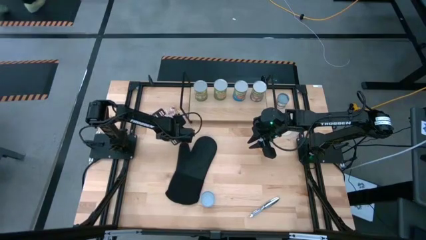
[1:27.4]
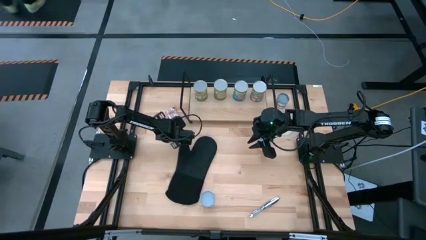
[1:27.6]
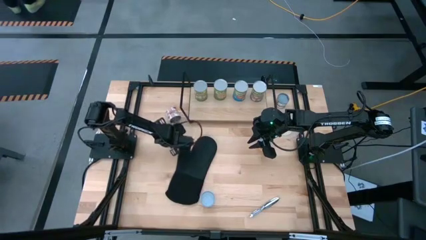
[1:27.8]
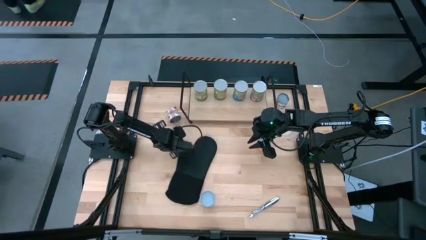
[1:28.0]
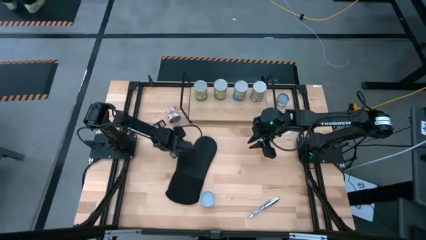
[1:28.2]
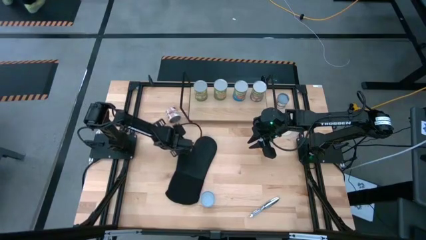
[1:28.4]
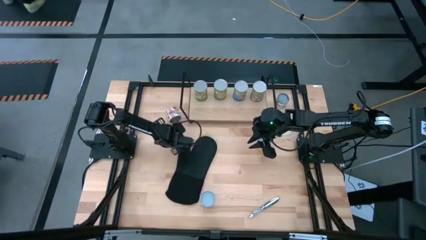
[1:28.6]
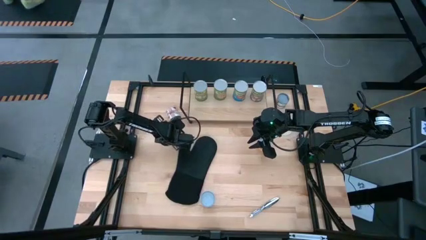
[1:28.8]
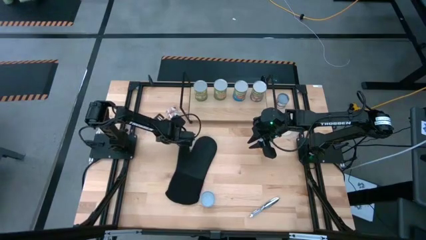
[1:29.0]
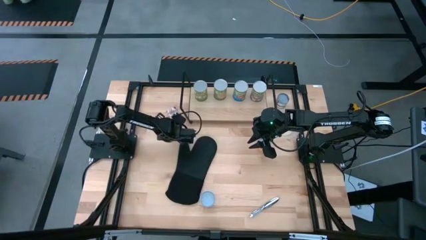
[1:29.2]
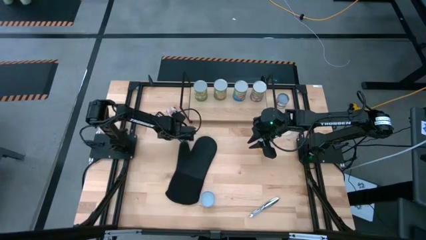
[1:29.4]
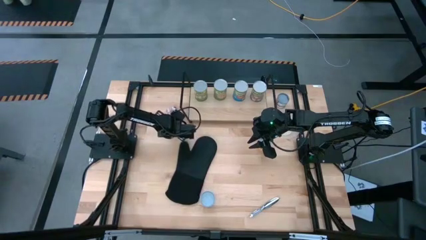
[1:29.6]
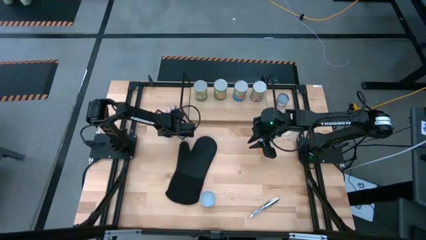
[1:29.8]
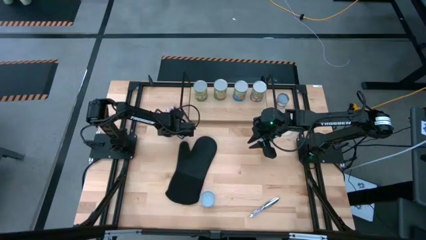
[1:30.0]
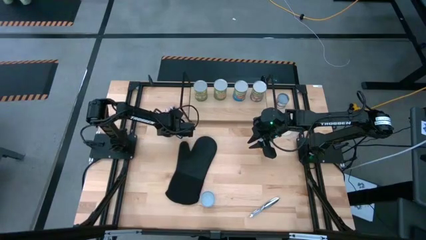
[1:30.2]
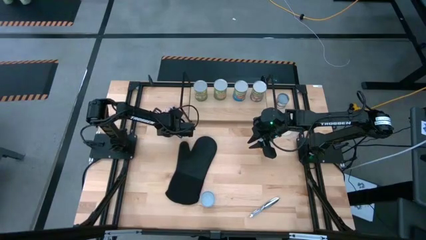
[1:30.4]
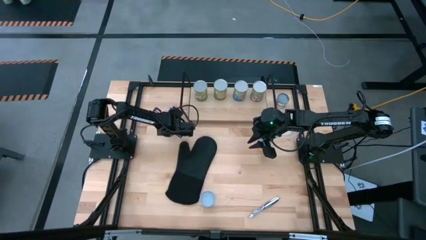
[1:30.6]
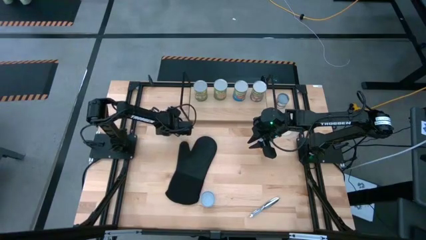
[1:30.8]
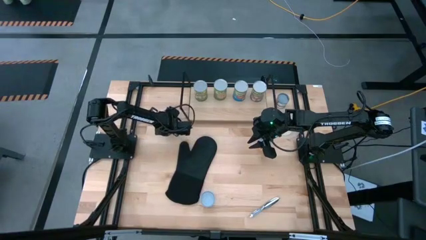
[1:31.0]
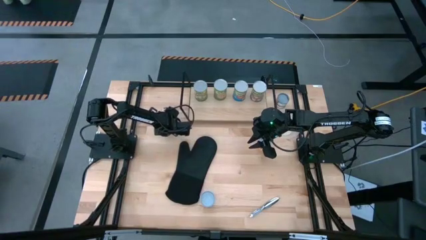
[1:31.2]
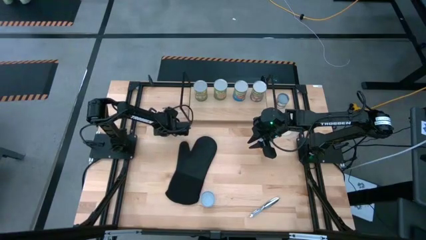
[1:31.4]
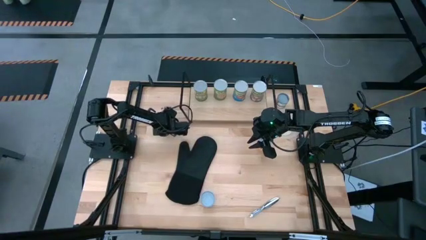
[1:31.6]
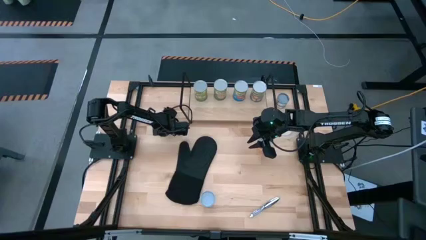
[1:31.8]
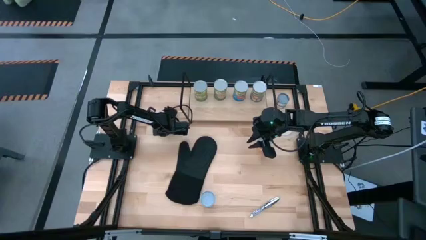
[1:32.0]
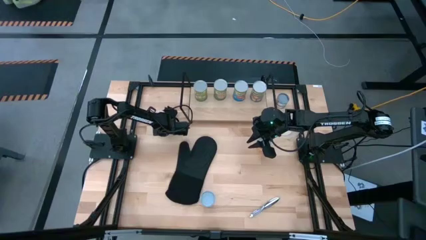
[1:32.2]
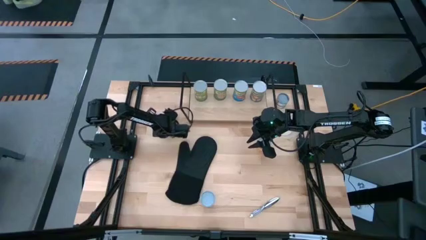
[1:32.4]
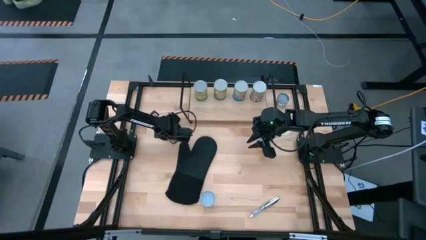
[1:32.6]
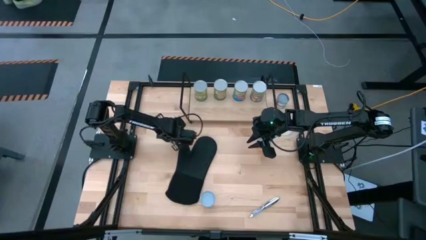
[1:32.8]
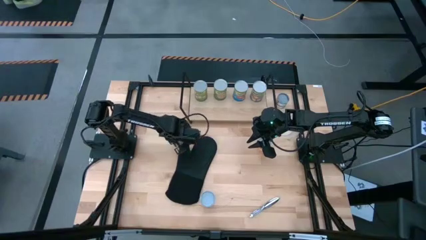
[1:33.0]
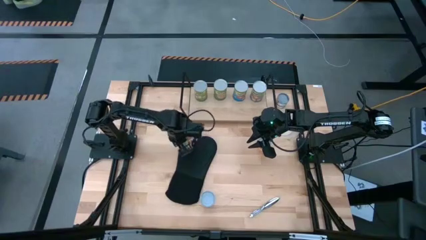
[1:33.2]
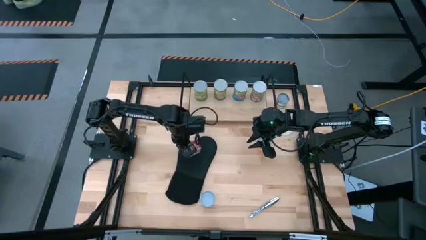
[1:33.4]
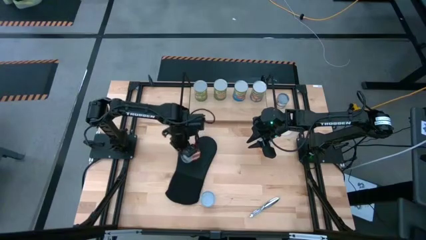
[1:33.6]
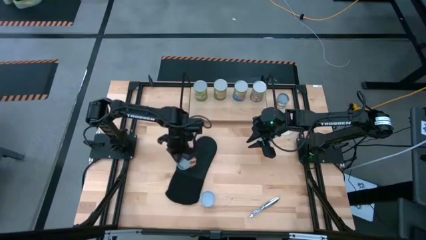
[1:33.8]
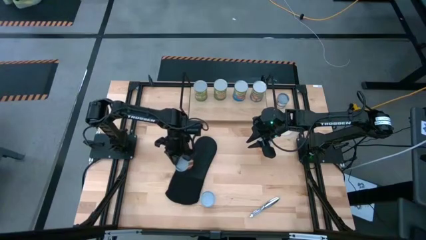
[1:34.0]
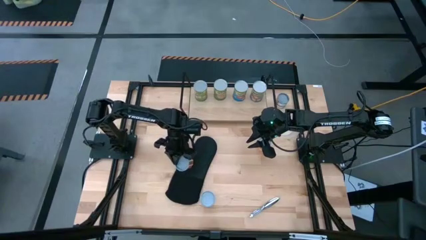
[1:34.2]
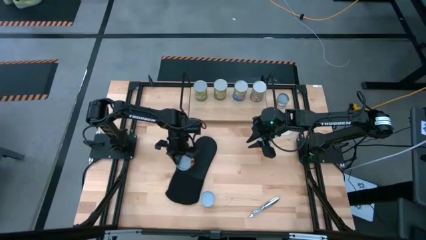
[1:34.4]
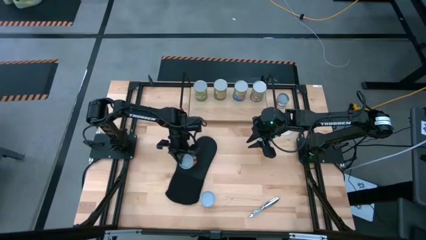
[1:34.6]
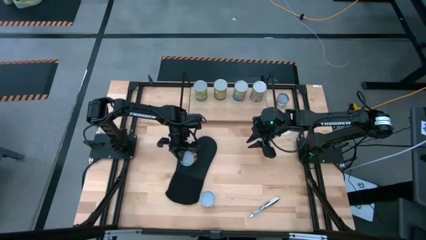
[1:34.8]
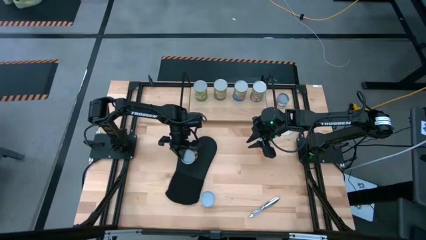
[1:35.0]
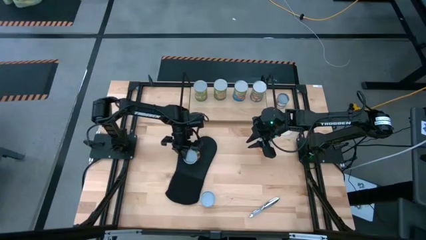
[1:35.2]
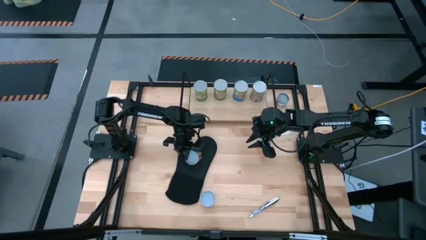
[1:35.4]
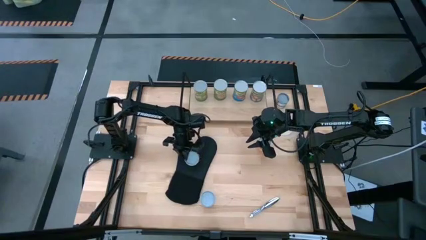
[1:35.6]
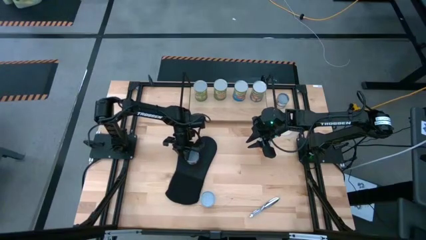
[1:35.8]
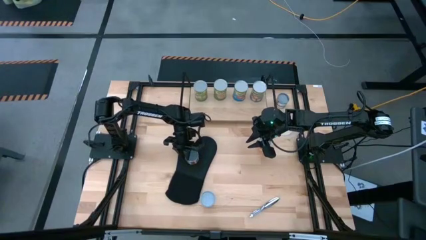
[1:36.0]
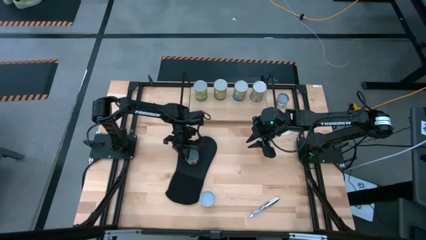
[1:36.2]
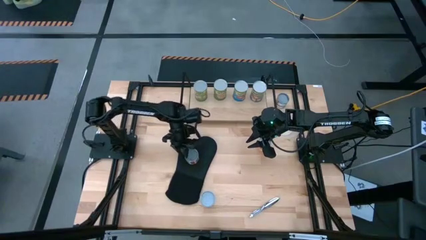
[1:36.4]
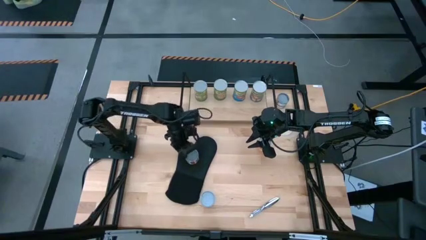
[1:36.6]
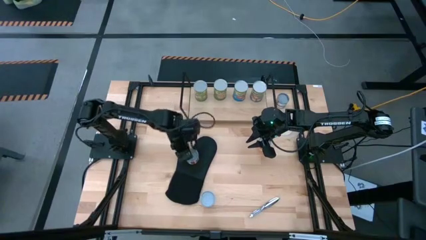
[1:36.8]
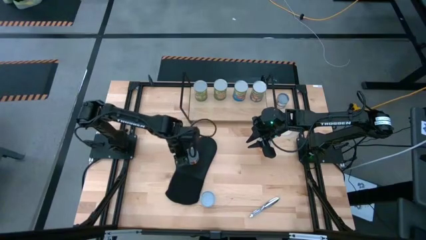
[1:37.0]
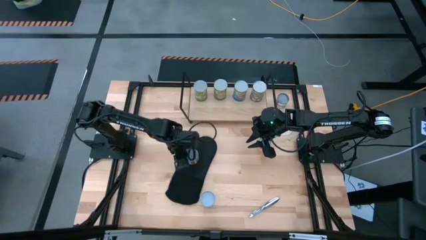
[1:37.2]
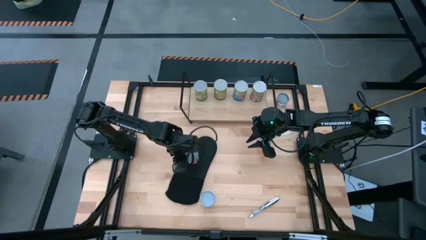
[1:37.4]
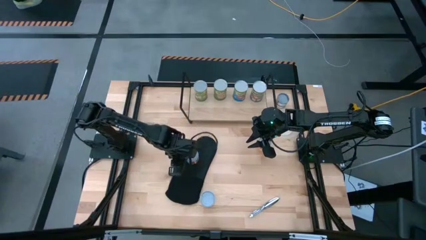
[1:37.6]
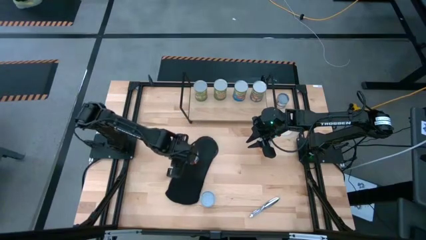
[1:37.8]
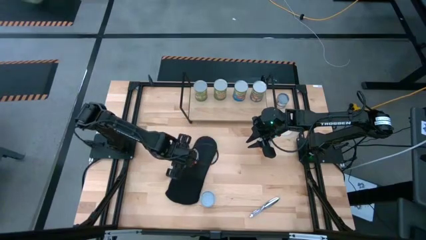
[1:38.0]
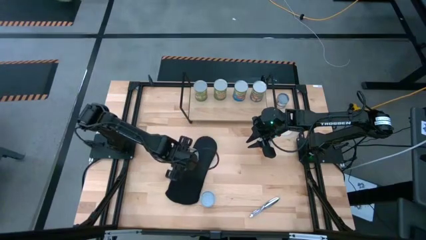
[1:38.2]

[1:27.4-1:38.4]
Task: Pick and place cans onto a shelf
Put the small canned tomatoes on the shelf
